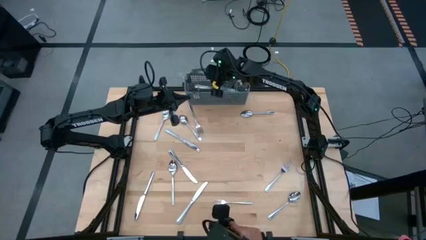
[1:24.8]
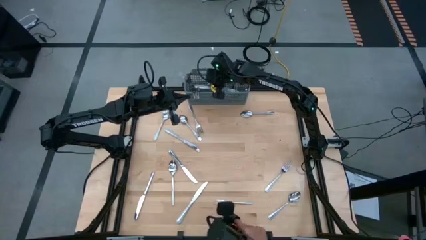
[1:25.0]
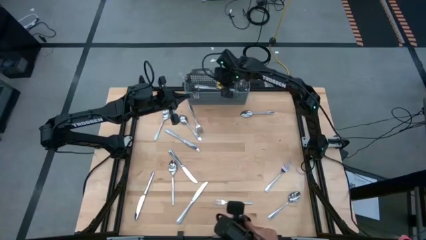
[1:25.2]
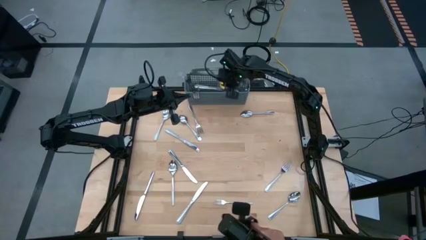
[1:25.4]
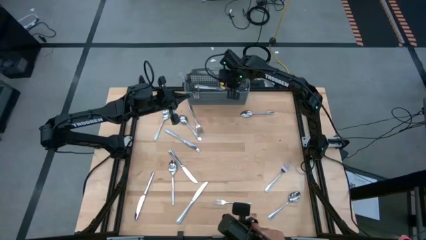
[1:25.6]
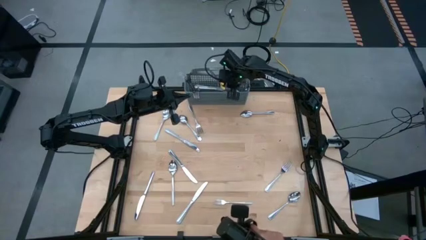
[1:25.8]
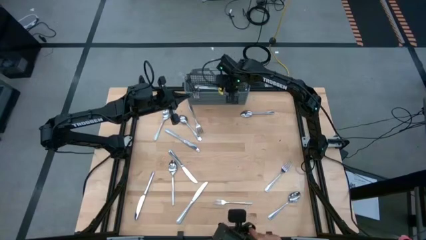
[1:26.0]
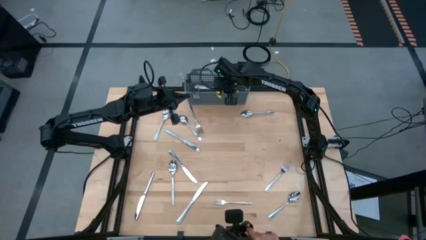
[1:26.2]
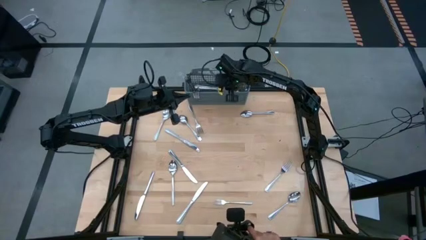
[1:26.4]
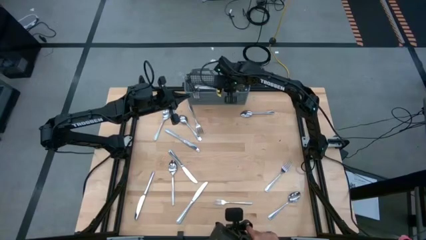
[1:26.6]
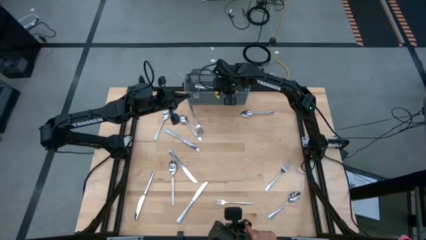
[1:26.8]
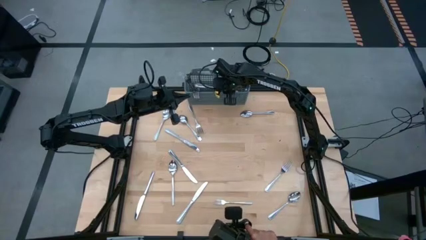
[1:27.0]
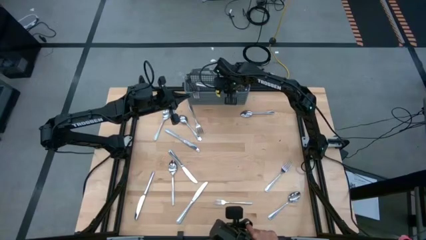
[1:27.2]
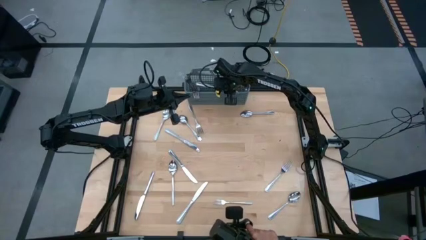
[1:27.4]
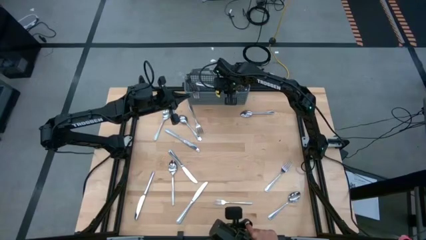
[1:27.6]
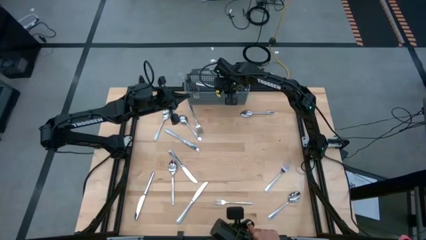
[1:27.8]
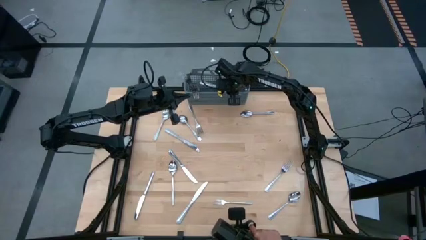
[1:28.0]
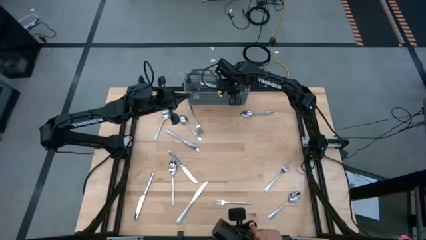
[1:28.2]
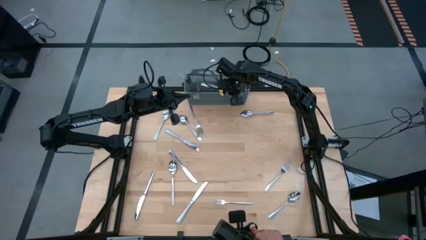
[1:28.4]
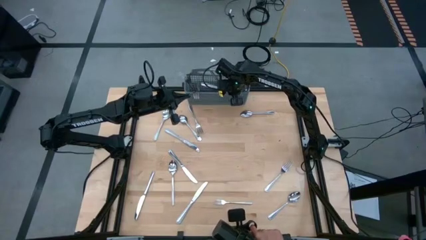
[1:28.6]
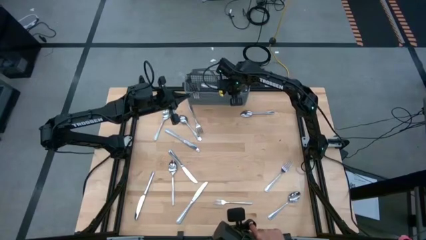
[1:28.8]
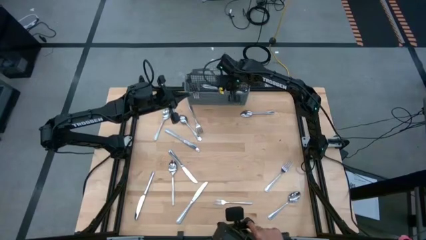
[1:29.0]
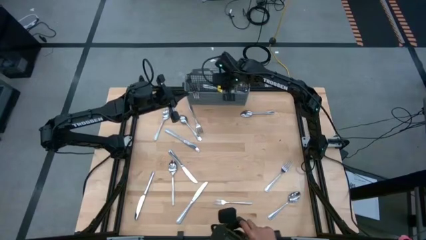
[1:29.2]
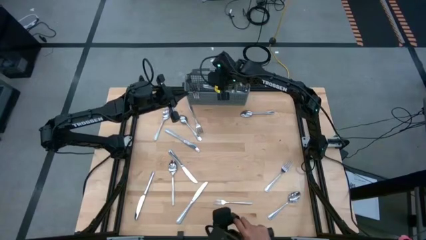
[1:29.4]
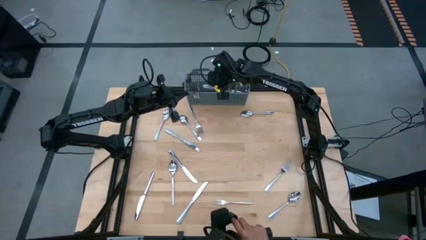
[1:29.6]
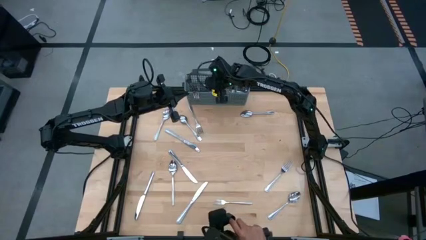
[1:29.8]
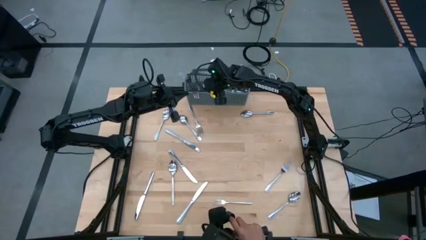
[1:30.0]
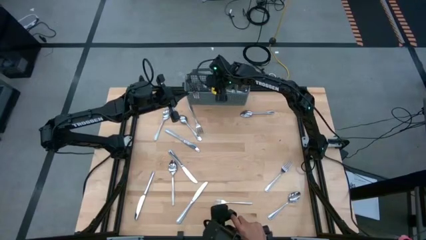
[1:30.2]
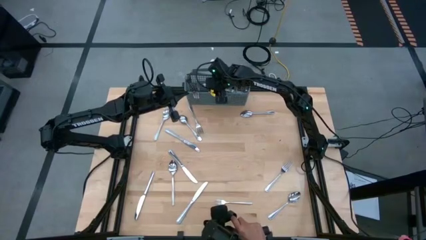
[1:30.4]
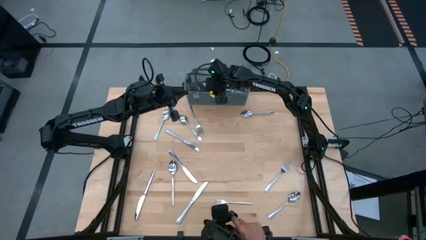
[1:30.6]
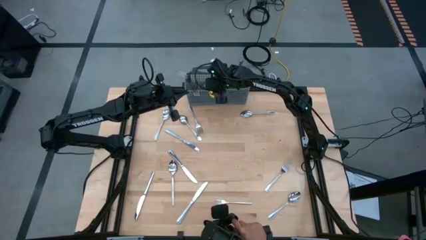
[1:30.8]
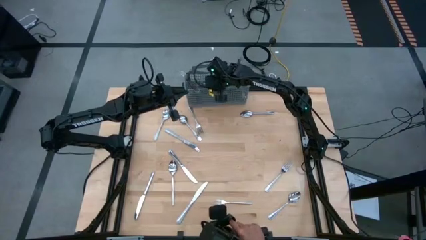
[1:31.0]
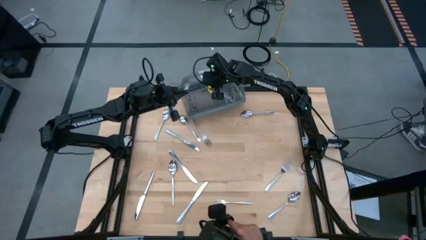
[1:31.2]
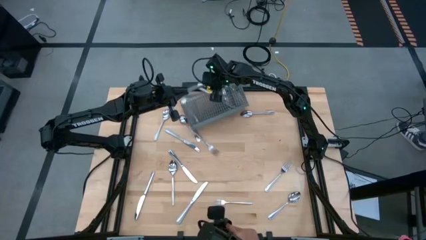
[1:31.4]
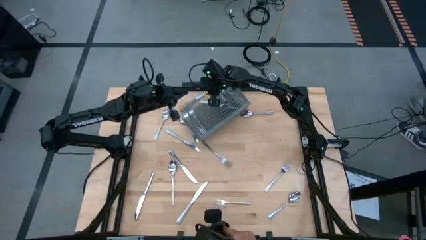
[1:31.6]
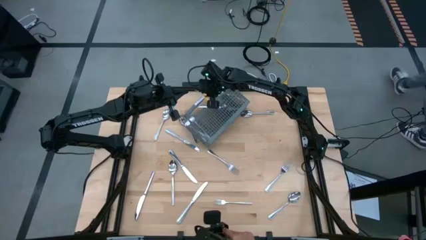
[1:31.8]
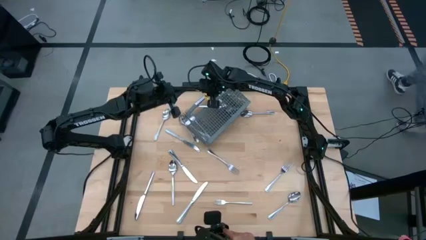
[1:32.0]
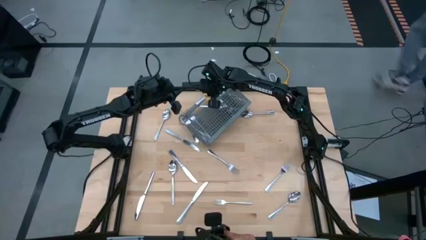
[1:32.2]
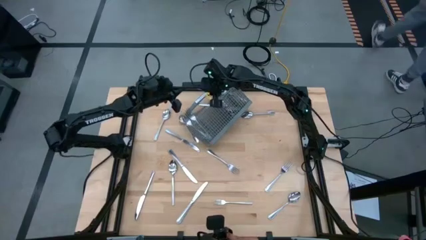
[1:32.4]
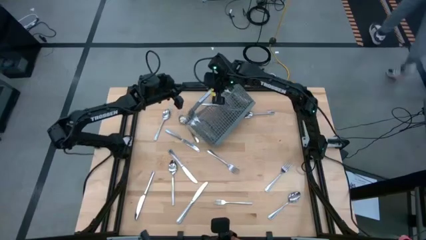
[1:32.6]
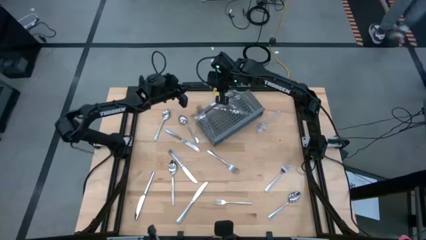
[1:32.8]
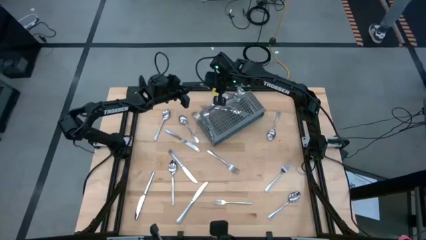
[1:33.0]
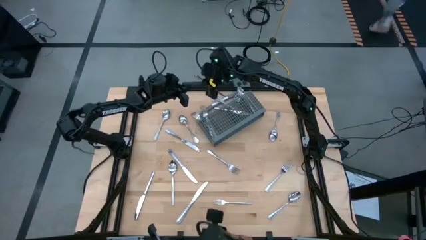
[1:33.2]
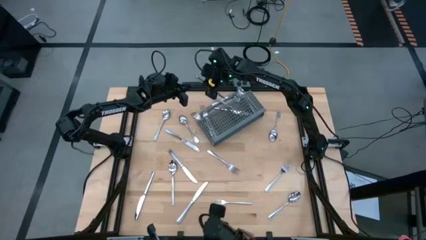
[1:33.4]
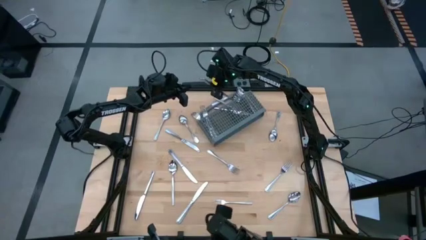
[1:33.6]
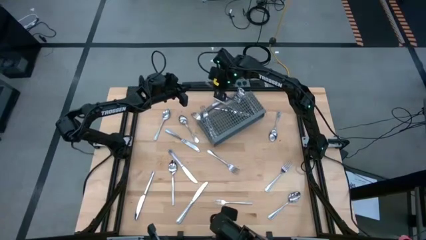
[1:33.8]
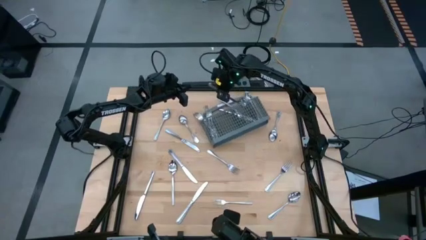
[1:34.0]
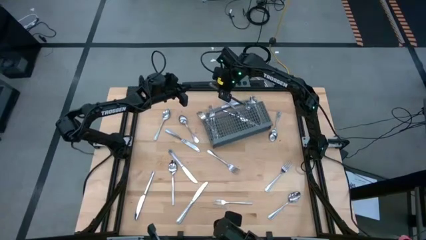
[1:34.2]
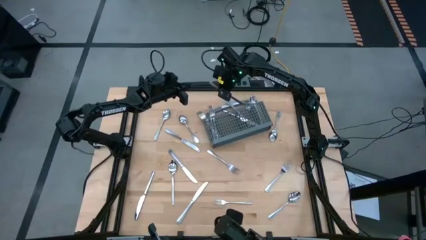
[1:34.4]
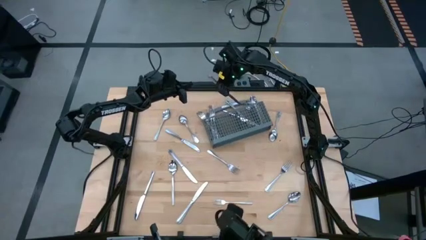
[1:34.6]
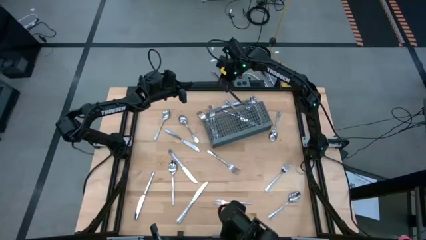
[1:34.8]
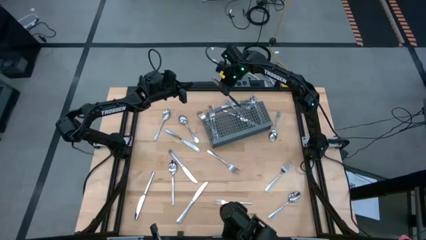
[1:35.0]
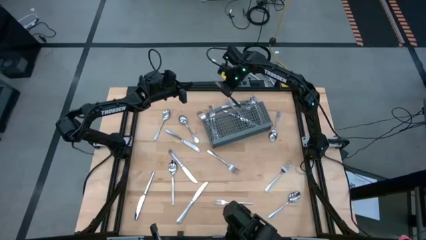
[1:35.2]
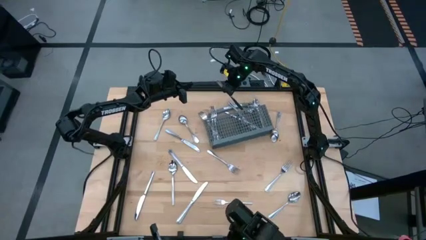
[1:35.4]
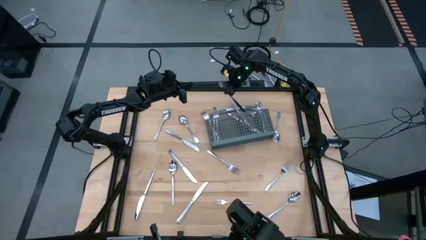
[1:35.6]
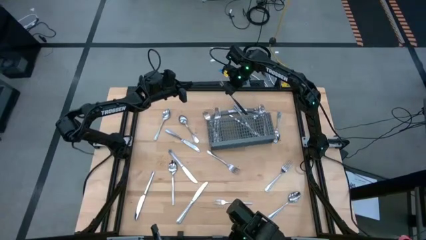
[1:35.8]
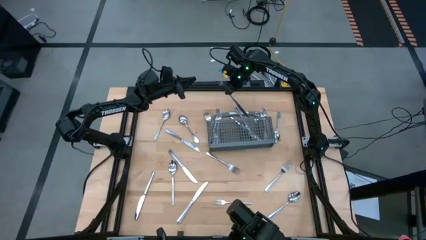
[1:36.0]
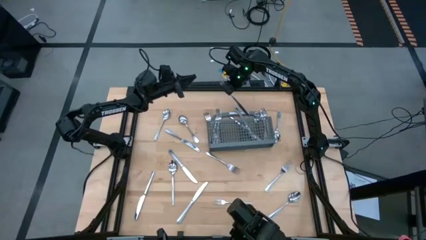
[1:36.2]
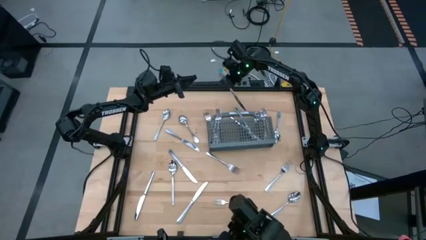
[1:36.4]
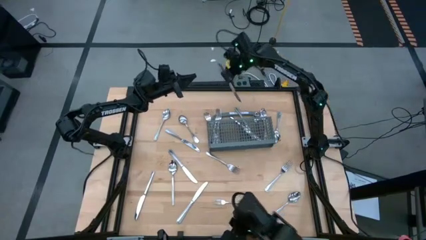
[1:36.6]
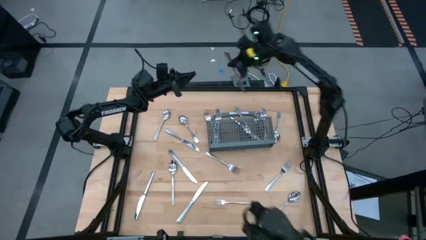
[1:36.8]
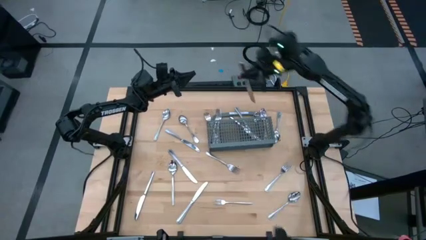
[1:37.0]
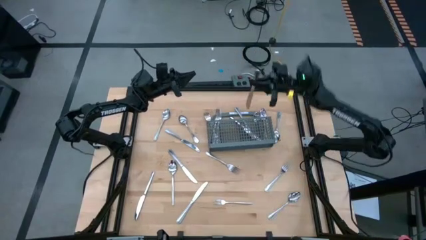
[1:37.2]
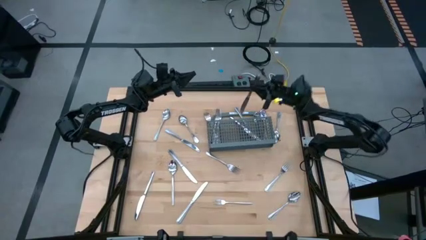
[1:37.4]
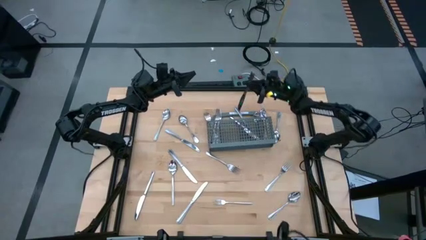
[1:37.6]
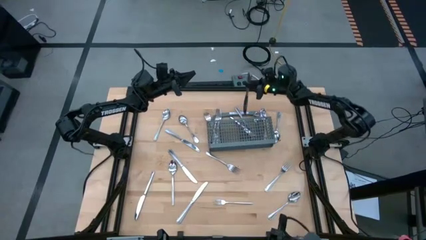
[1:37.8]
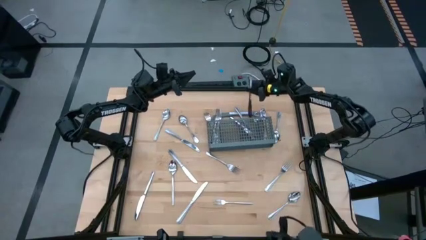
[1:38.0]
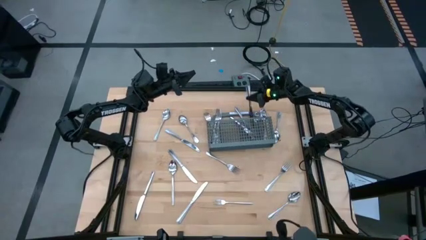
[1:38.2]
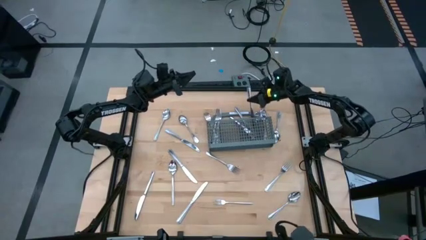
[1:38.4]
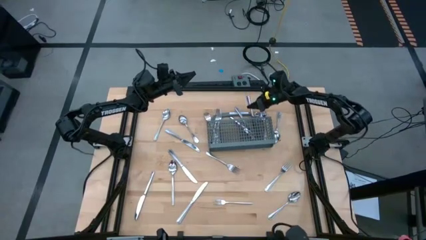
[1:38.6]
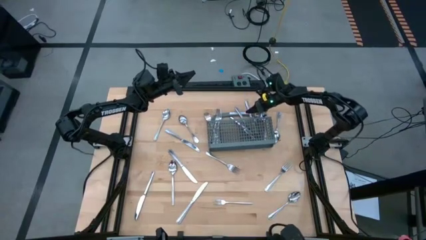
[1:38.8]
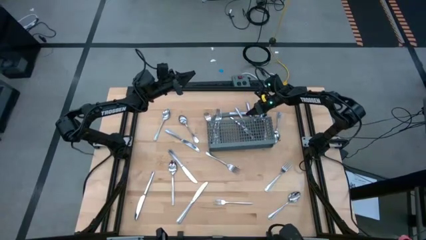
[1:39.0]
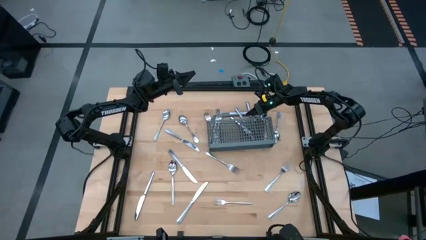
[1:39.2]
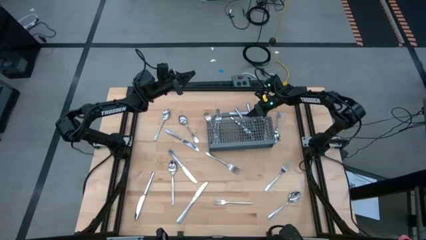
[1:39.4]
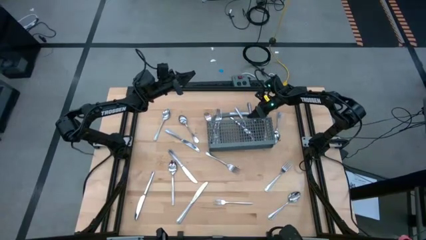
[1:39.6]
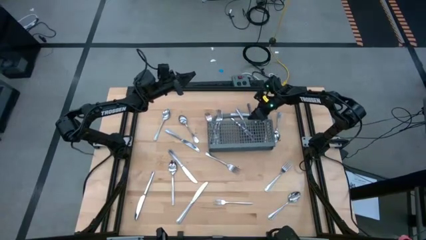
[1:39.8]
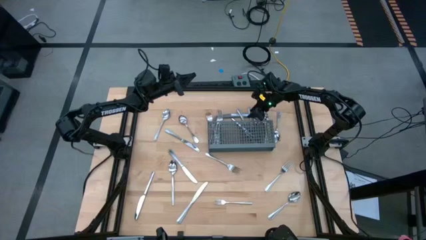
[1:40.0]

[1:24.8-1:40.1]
Task: Sort silverware
Put the silver table knife into the silverware organizer

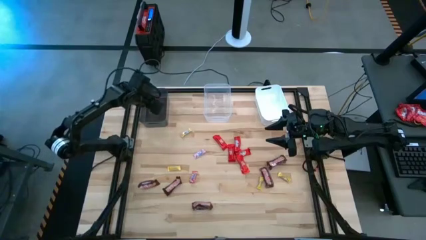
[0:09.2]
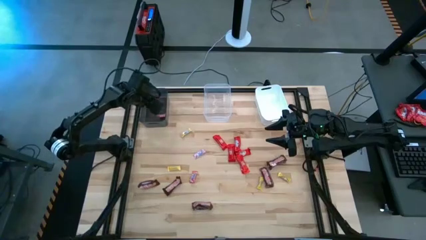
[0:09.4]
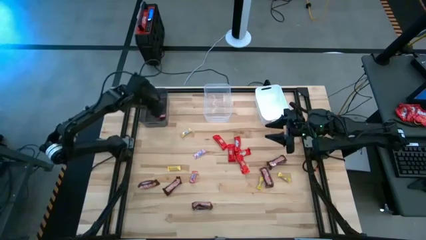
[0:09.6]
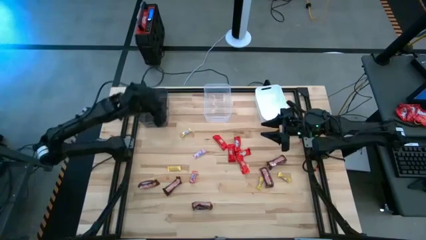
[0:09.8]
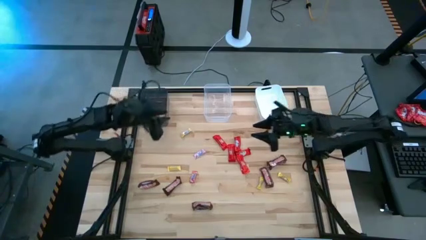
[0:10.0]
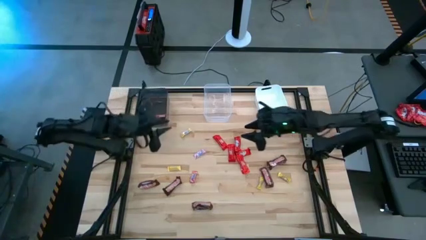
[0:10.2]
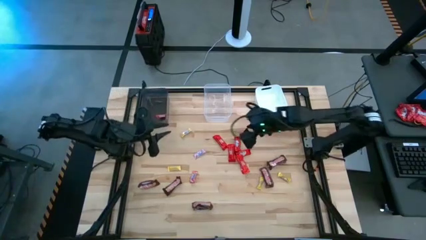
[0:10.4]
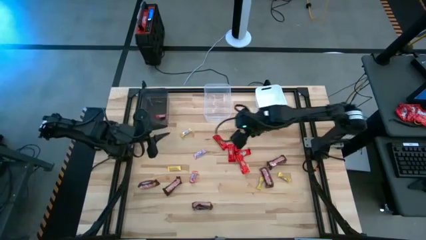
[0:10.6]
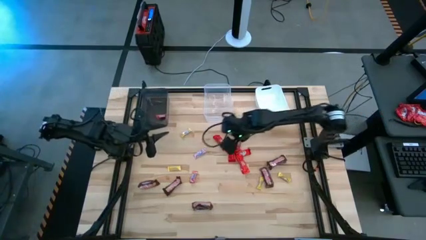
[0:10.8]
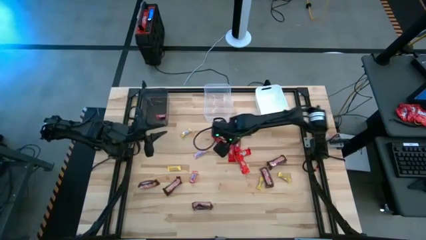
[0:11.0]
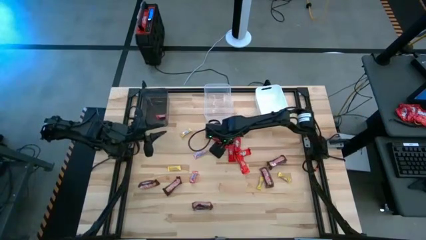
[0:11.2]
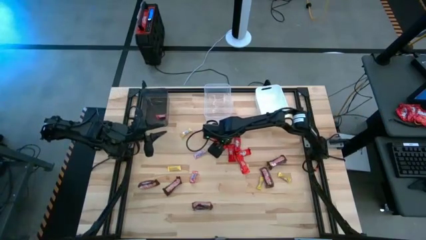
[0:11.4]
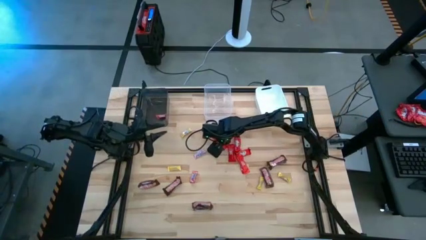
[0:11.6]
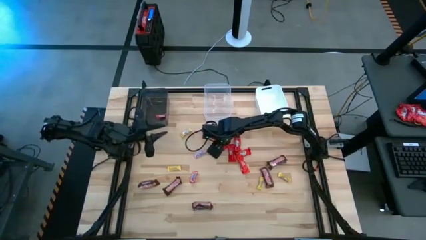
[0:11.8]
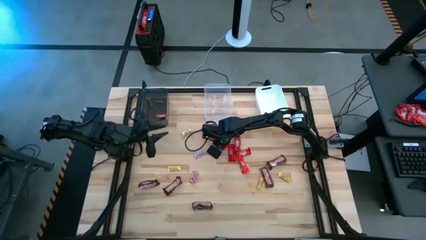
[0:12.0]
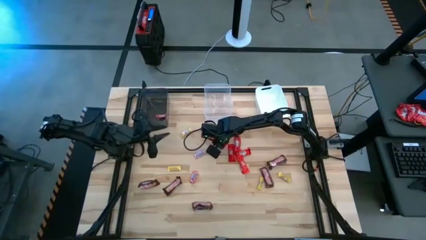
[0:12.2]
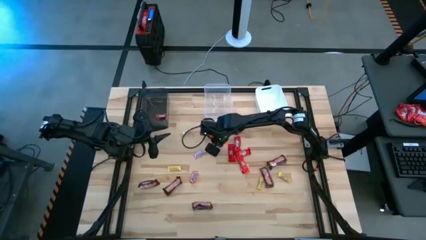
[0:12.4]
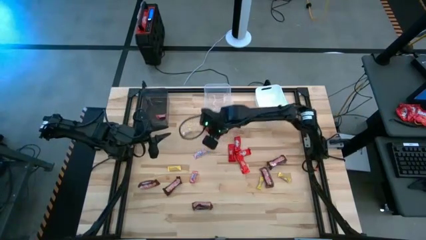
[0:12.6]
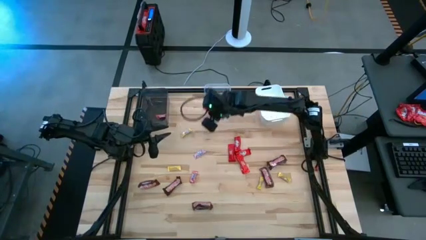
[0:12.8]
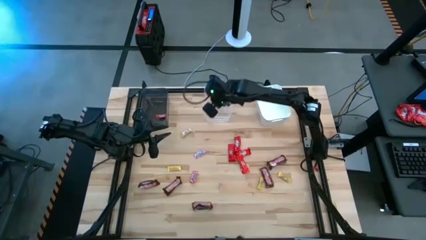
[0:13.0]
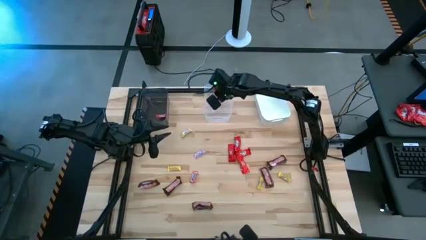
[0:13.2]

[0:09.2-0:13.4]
Task: Sort candy by brand, put in halloween buckets
Put the red chocolate bar into the transparent bin
